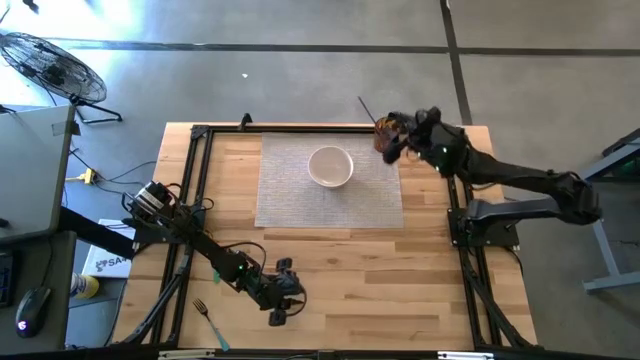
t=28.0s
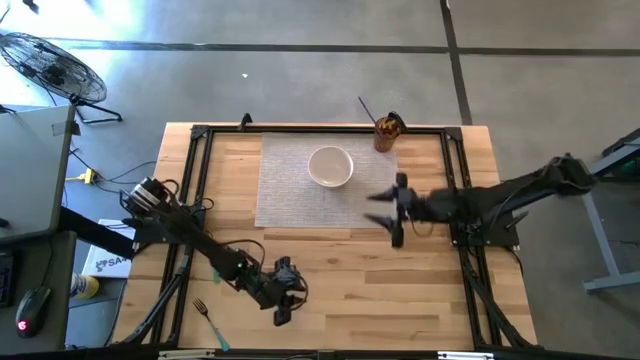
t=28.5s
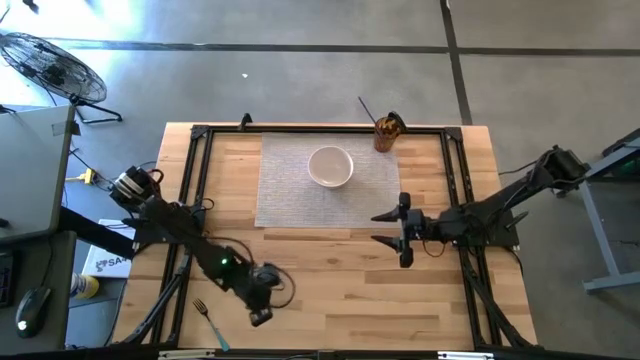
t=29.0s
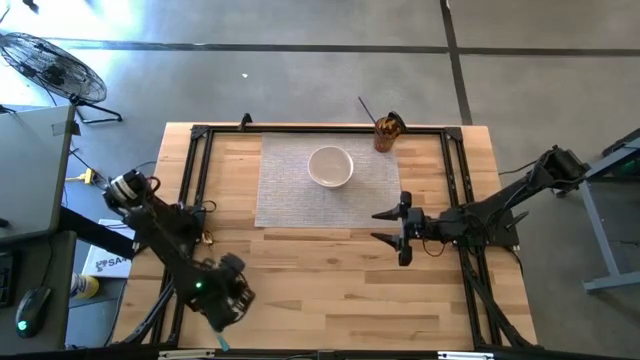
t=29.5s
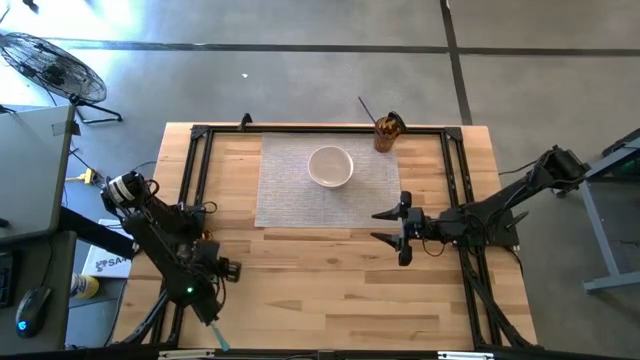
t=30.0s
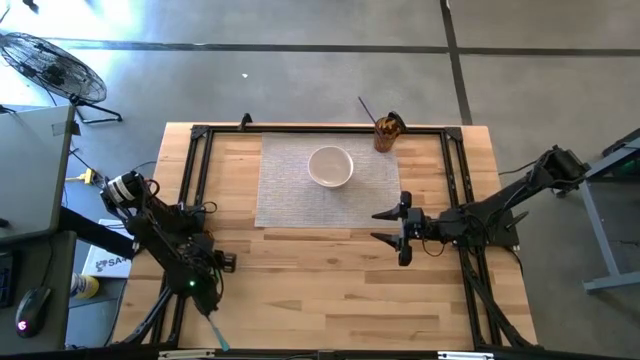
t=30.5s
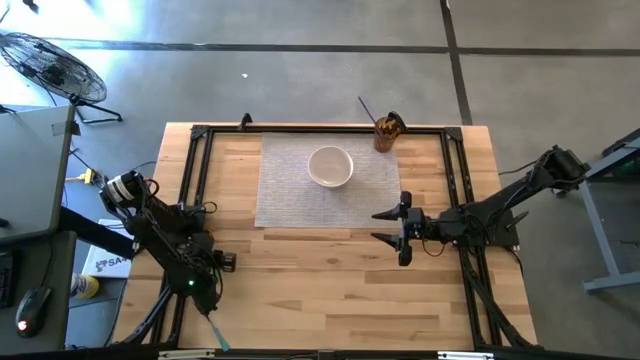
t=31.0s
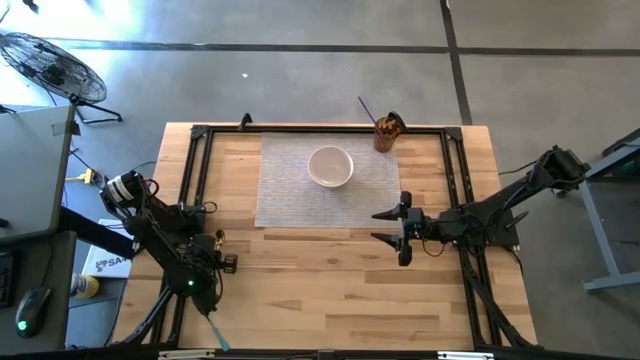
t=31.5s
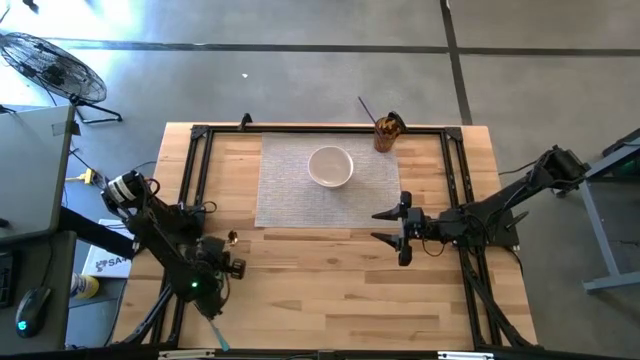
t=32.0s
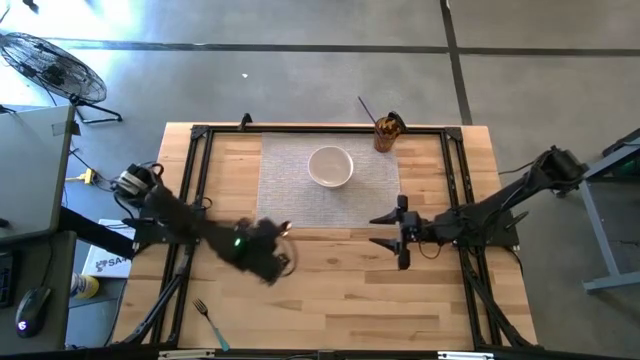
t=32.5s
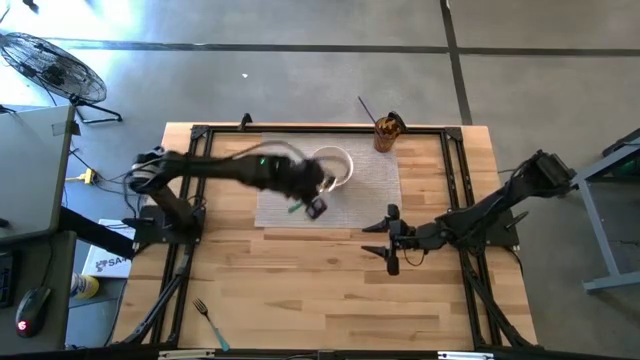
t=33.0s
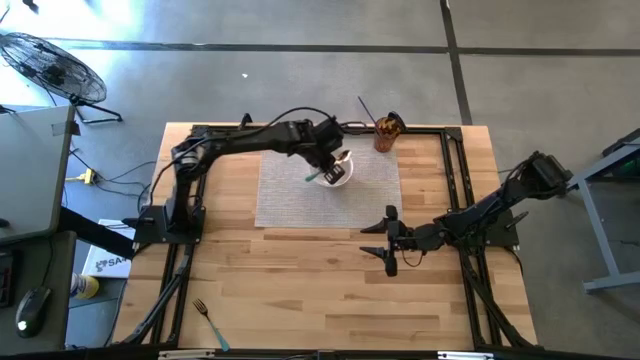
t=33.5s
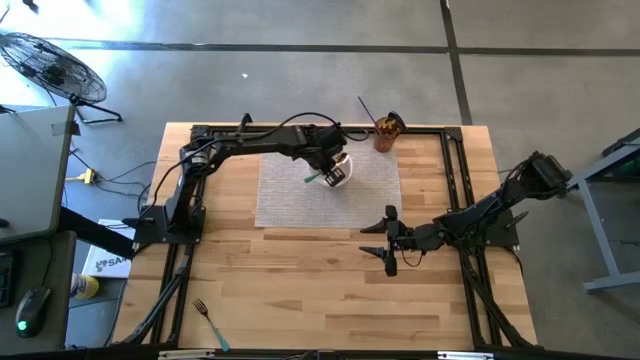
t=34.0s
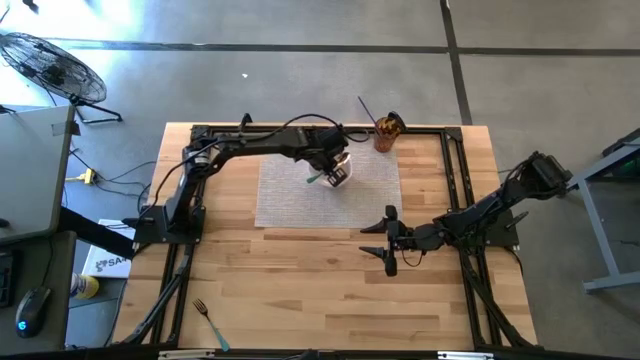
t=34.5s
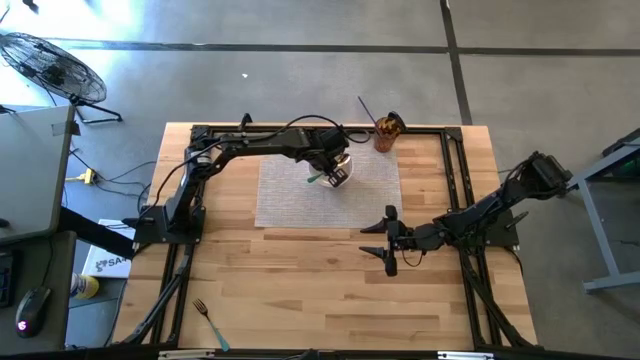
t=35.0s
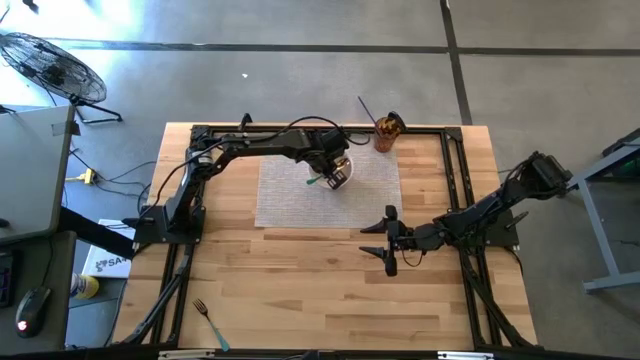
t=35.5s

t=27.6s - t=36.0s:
Task: Pick & Place Utensil
Put the green spoon into the white bowl

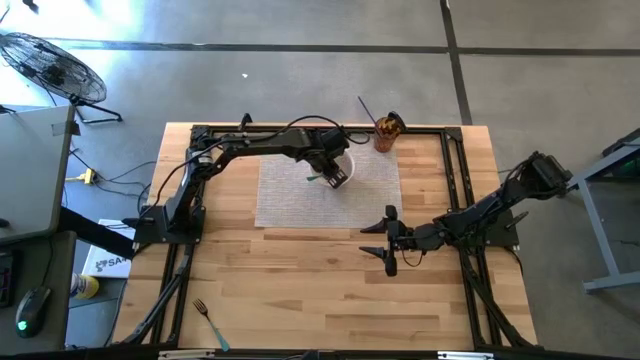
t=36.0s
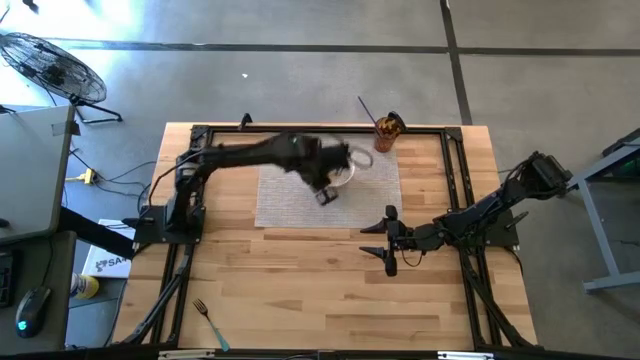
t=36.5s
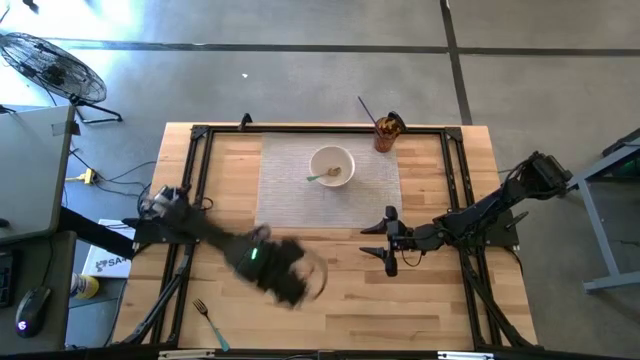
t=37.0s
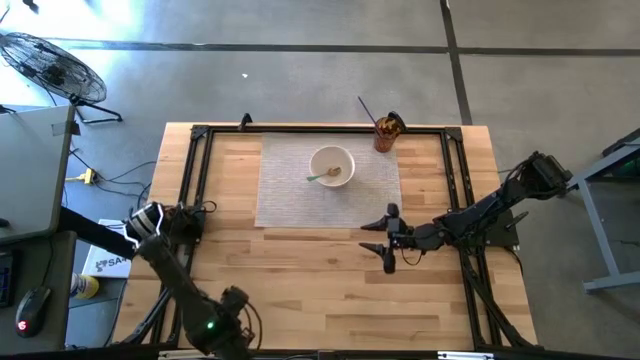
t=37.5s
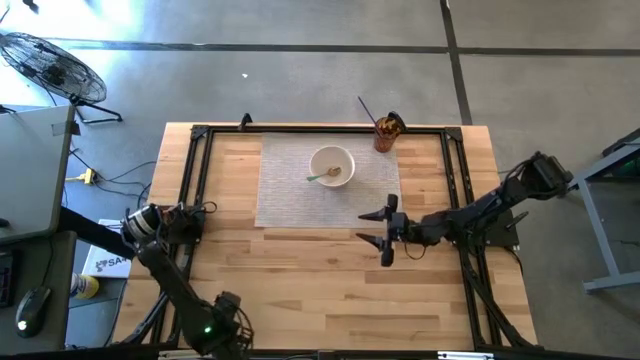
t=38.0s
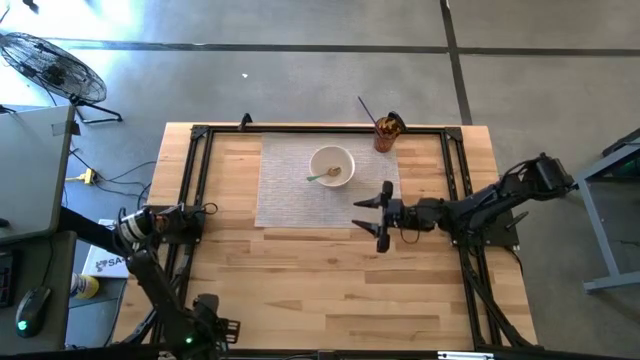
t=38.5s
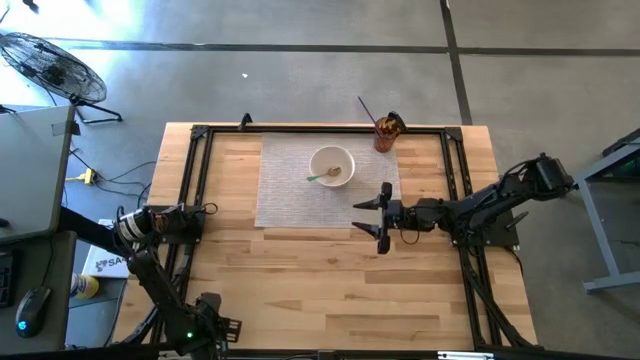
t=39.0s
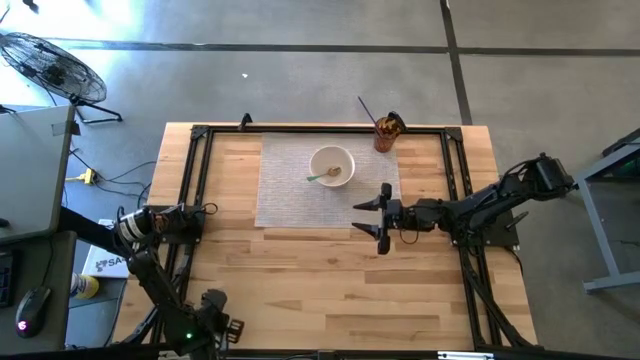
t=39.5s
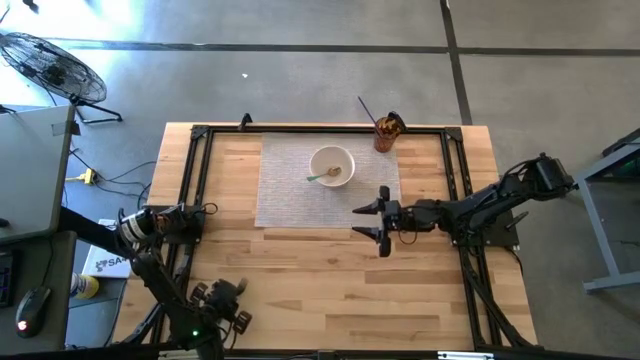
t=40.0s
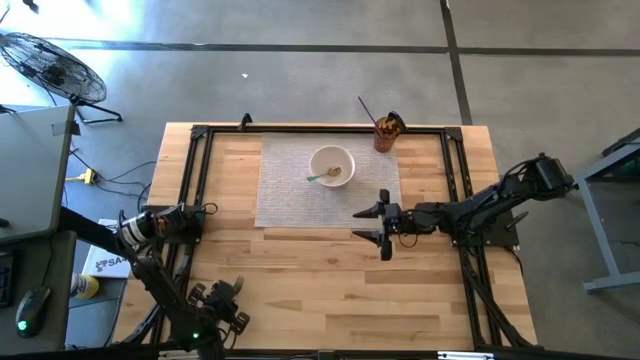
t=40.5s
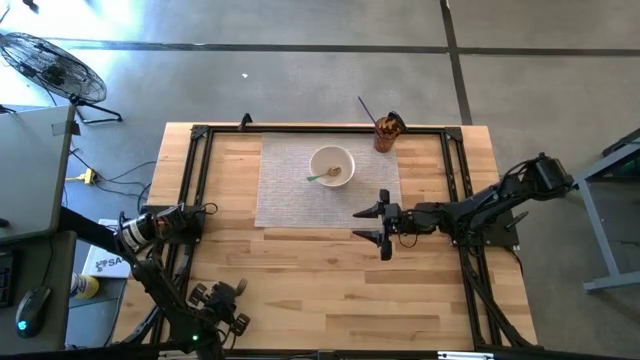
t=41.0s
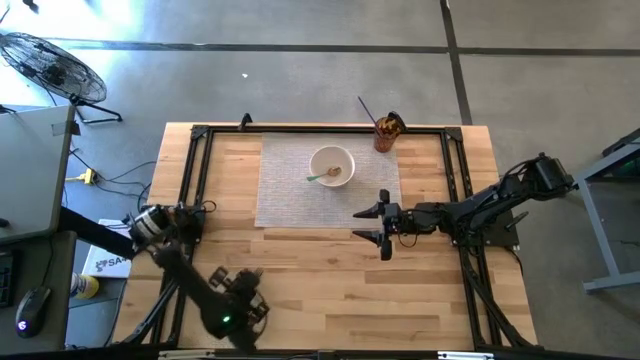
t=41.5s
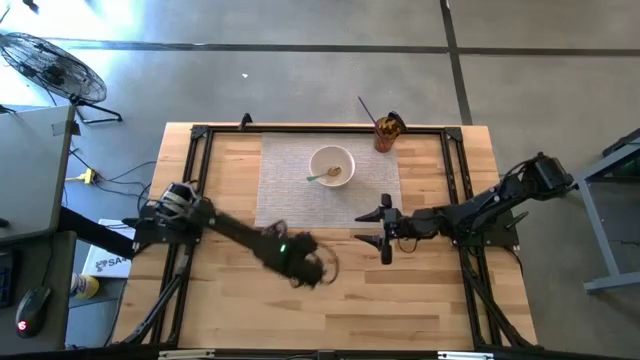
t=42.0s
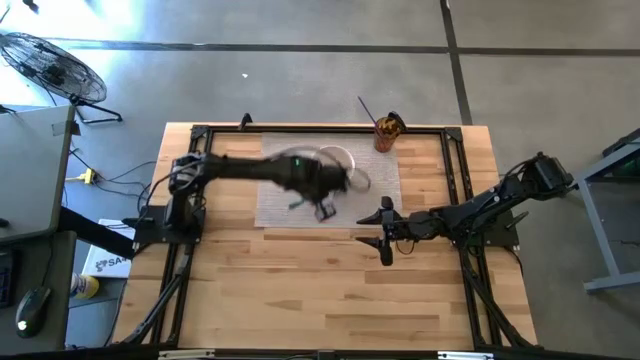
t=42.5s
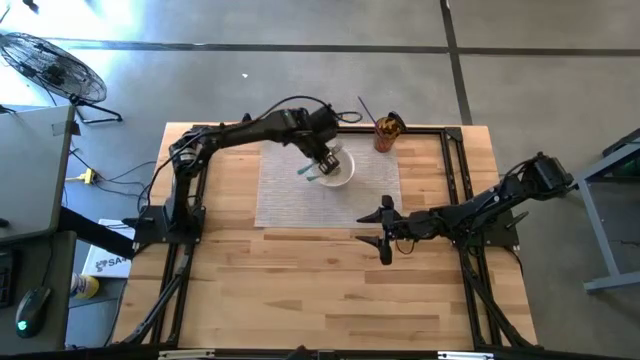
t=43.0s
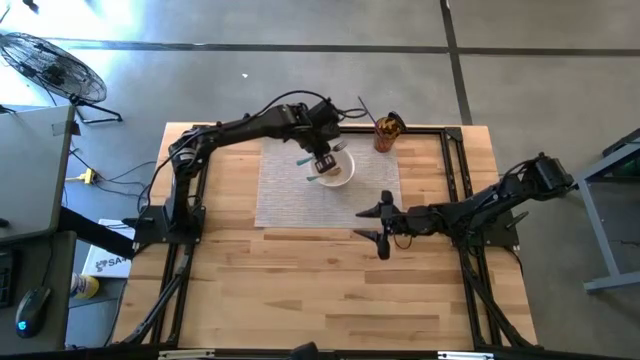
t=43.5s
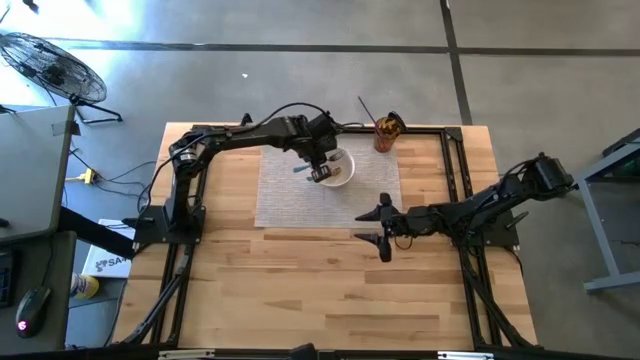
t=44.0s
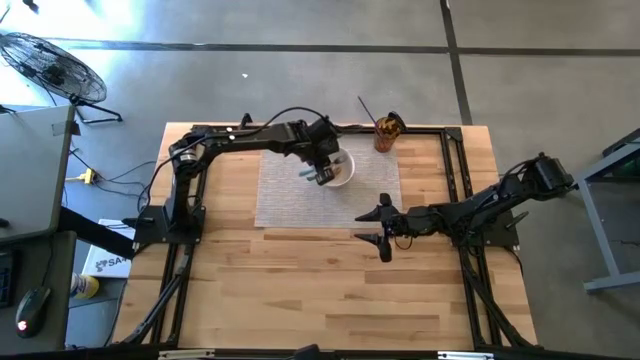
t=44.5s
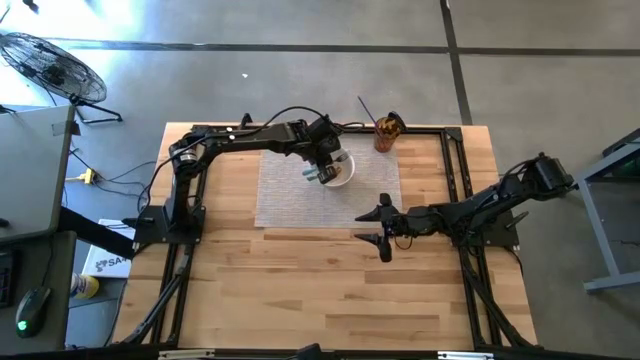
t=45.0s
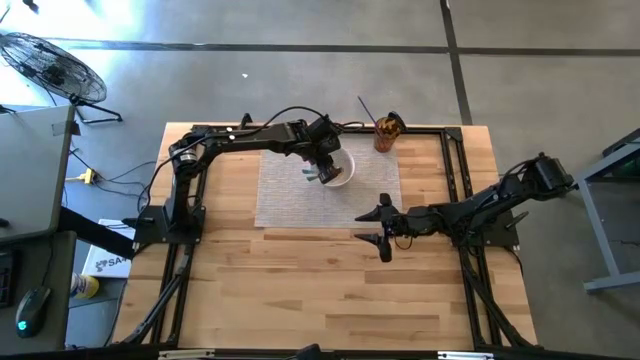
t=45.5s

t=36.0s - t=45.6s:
Put the blue fork into the white bowl

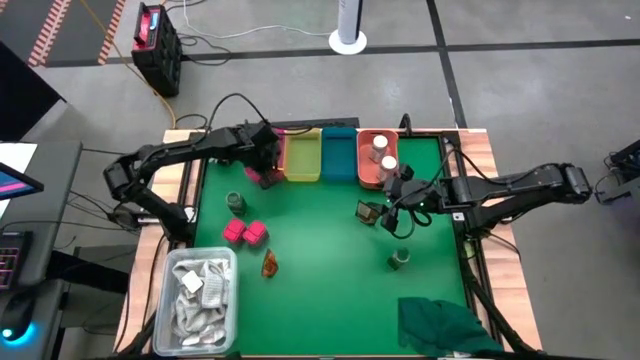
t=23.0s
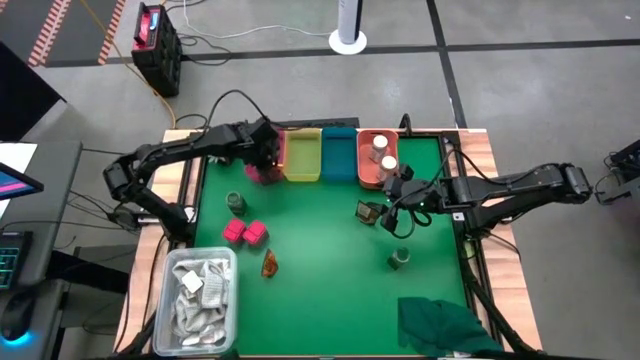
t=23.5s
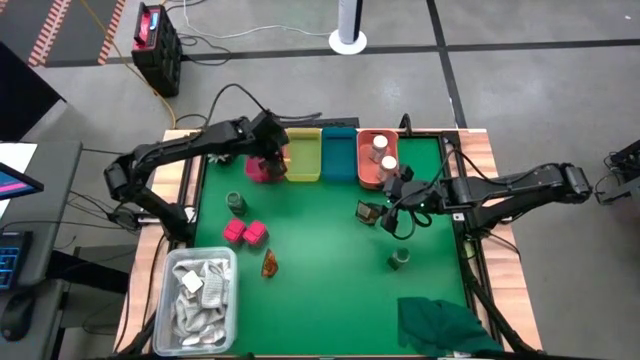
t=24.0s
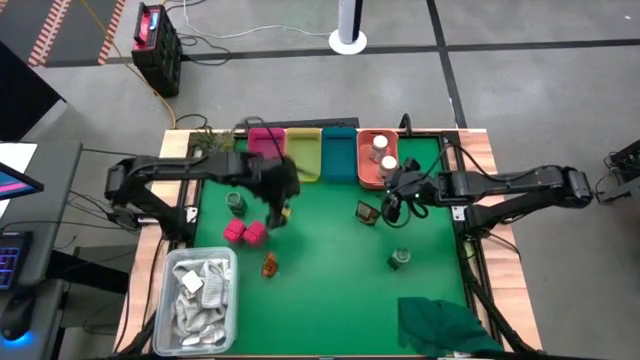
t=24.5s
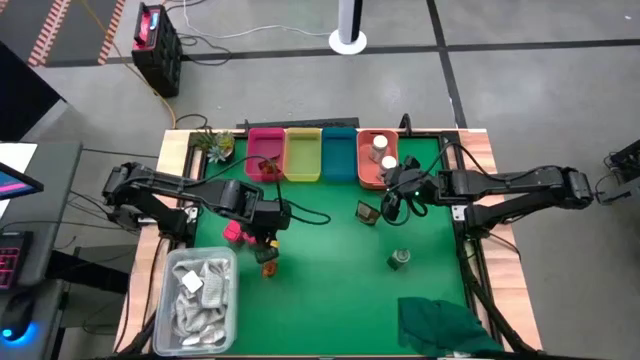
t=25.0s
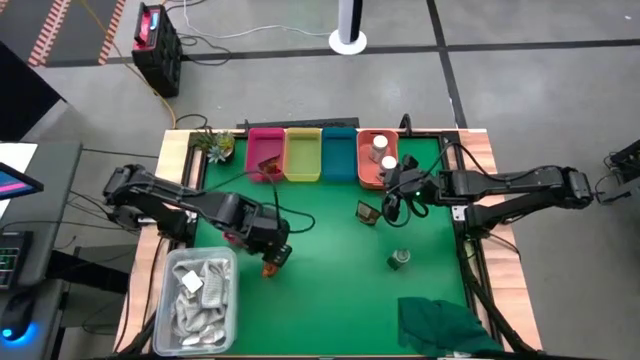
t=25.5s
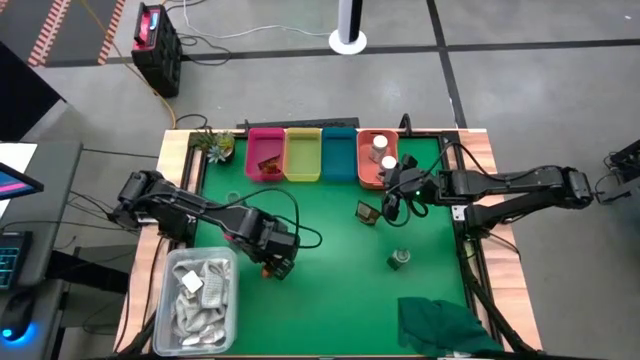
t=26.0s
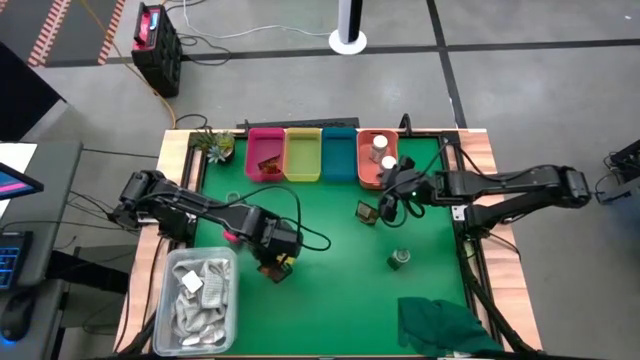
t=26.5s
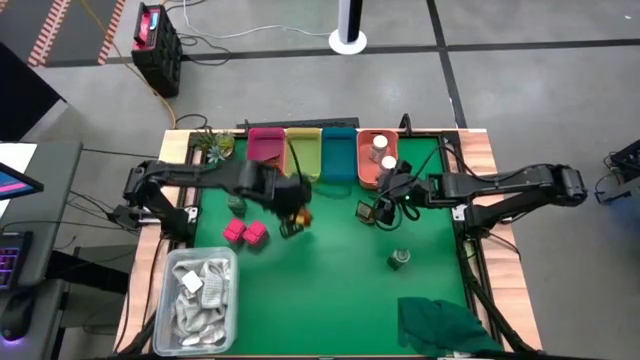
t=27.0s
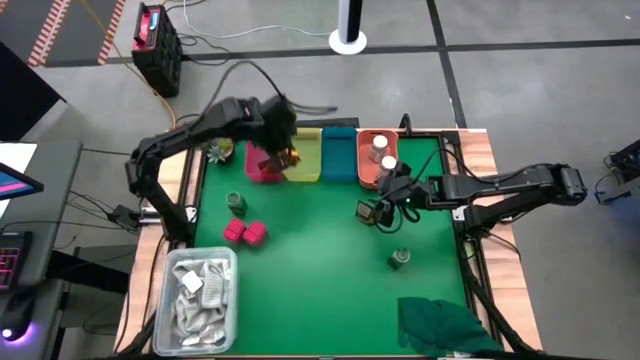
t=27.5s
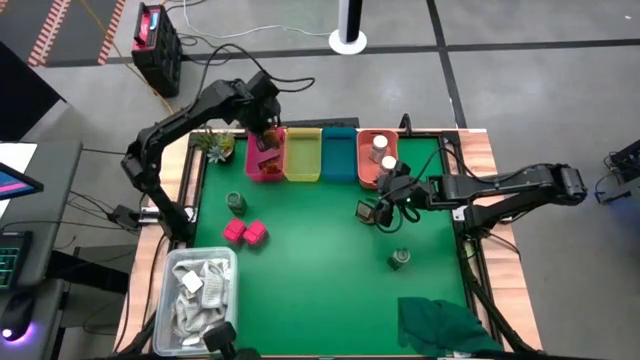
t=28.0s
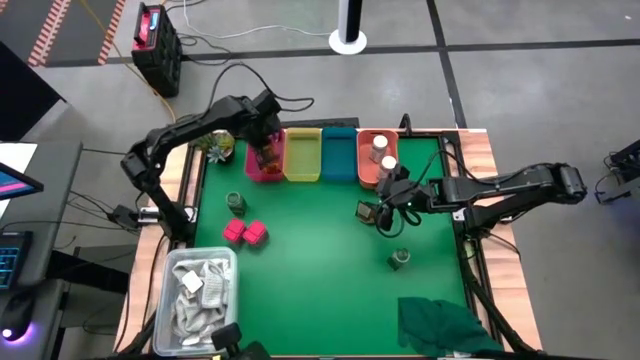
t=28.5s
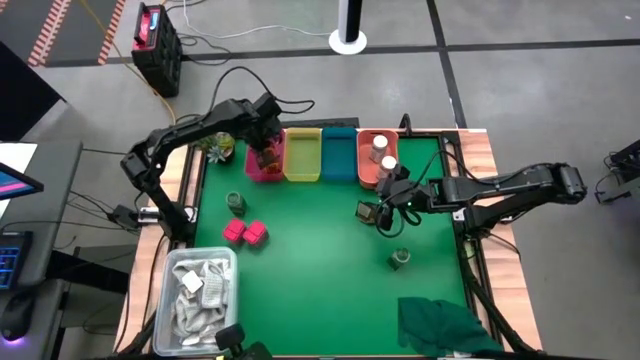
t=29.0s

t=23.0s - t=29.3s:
Task: Sort spices by type
Put the orange seasoning pack into the pink bin
